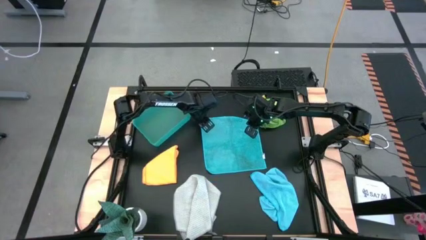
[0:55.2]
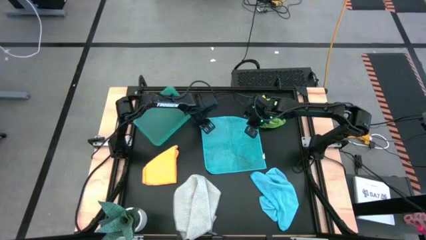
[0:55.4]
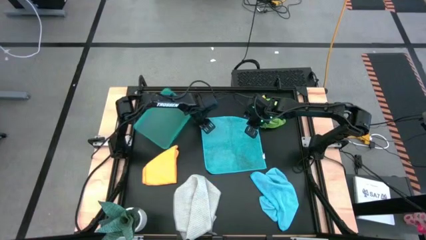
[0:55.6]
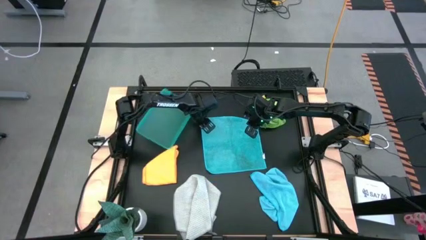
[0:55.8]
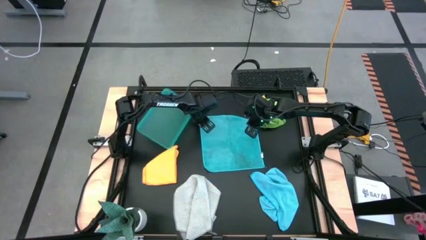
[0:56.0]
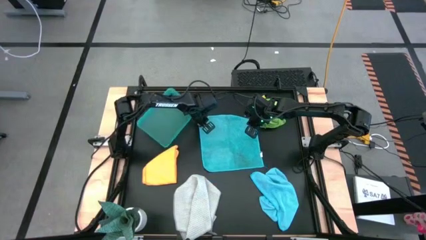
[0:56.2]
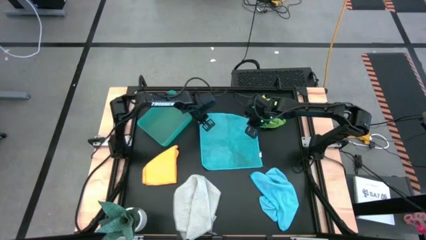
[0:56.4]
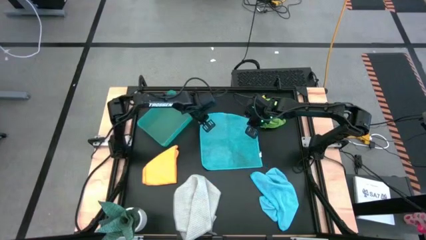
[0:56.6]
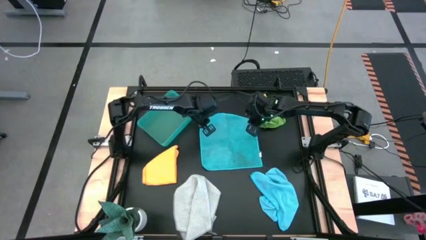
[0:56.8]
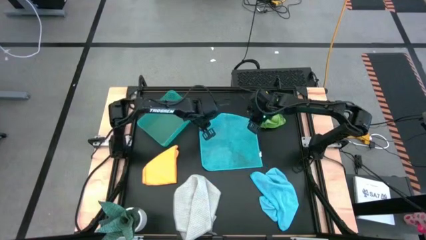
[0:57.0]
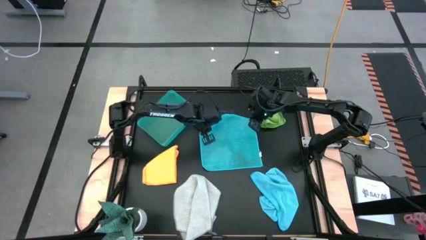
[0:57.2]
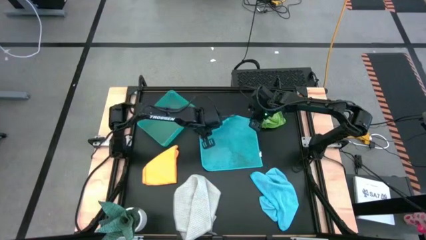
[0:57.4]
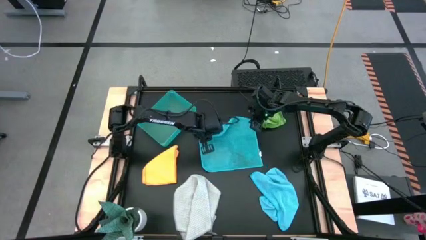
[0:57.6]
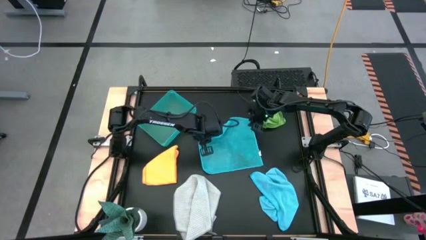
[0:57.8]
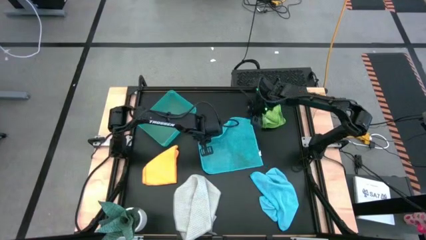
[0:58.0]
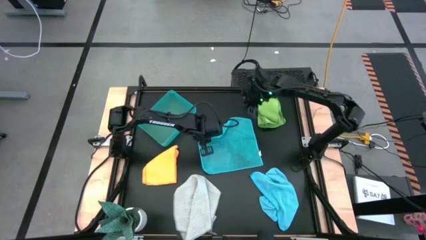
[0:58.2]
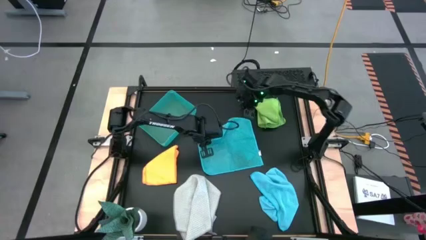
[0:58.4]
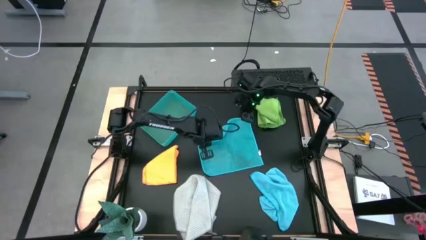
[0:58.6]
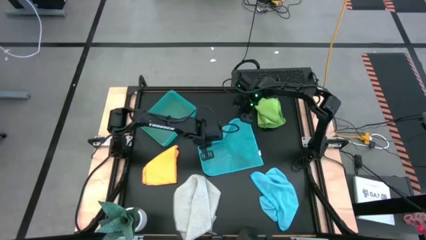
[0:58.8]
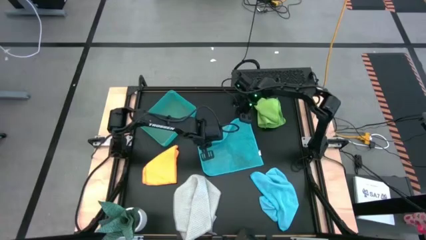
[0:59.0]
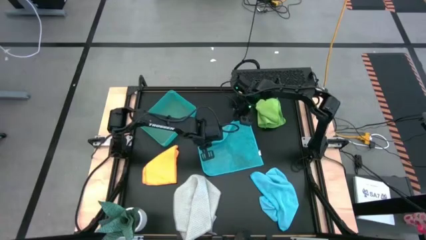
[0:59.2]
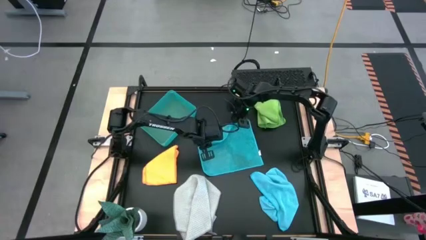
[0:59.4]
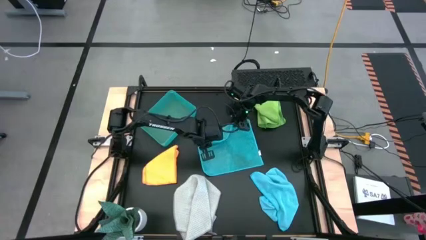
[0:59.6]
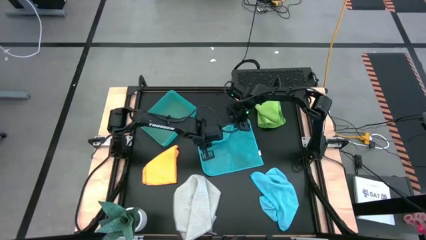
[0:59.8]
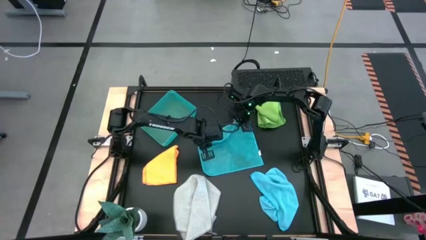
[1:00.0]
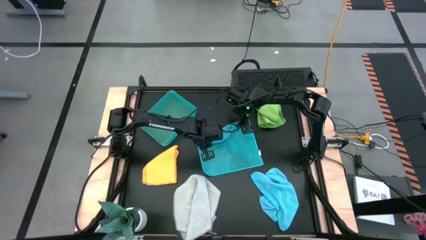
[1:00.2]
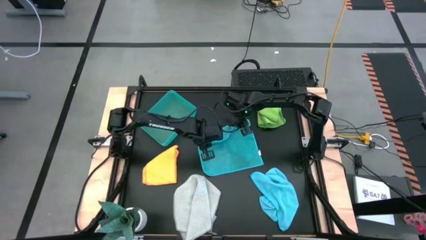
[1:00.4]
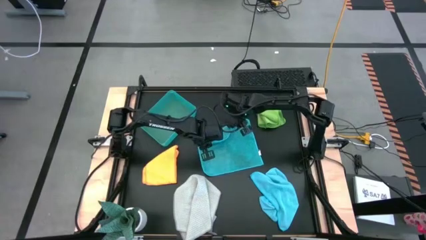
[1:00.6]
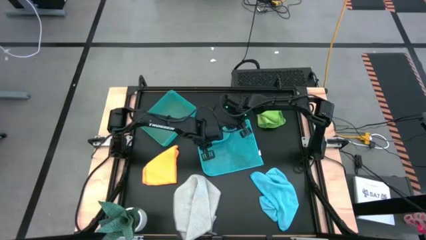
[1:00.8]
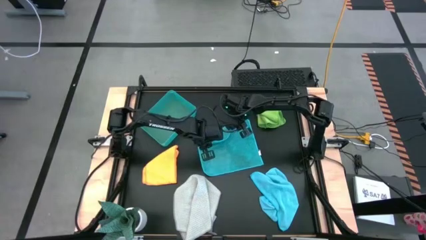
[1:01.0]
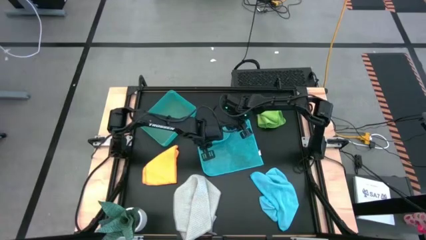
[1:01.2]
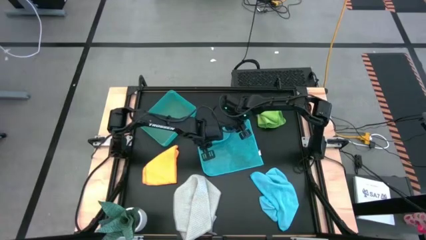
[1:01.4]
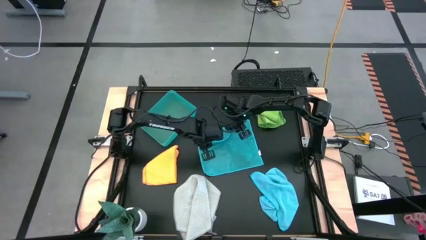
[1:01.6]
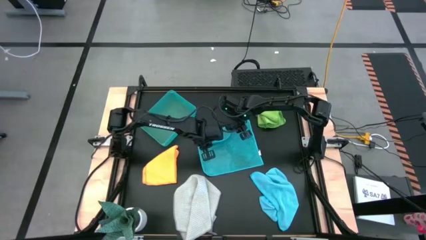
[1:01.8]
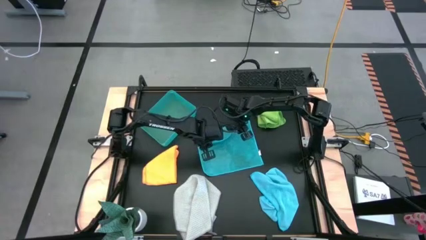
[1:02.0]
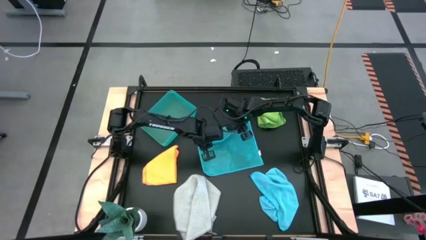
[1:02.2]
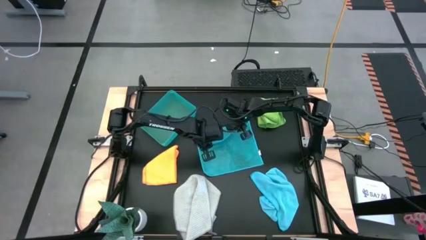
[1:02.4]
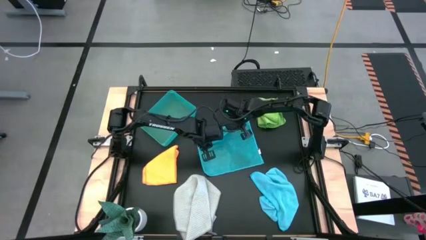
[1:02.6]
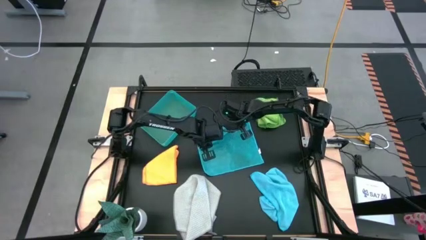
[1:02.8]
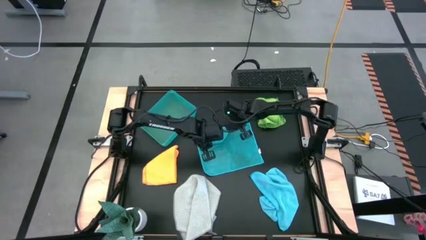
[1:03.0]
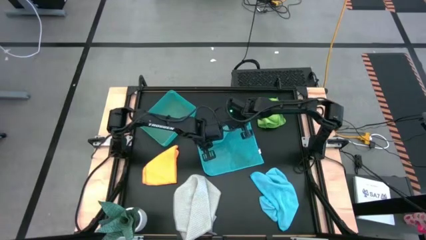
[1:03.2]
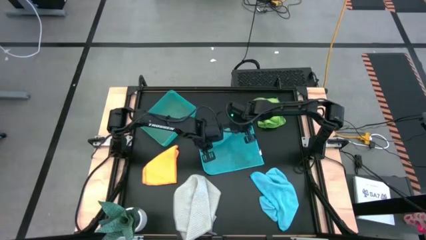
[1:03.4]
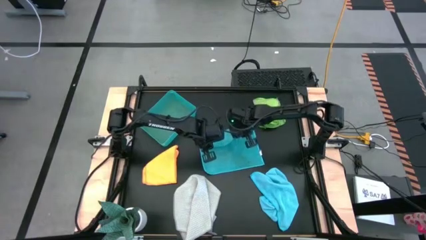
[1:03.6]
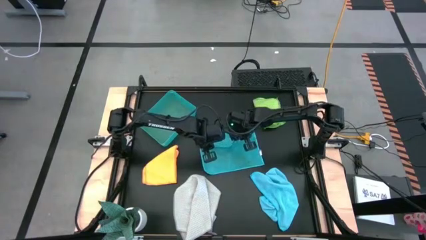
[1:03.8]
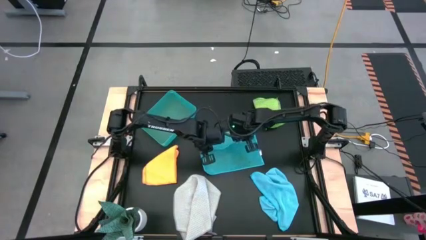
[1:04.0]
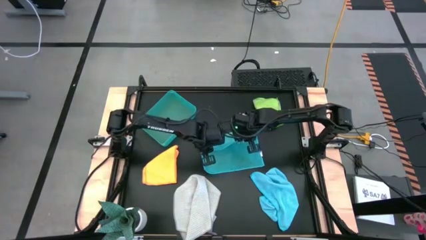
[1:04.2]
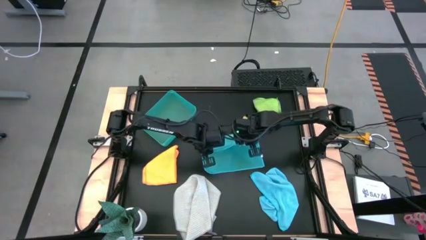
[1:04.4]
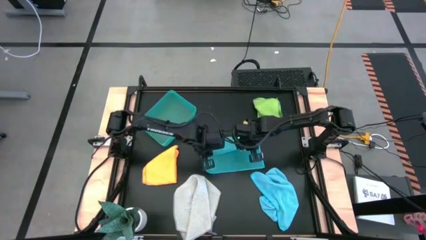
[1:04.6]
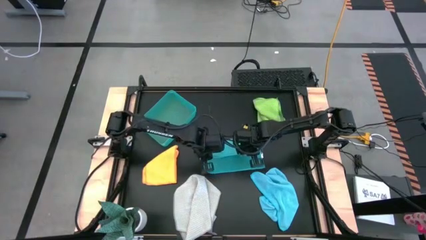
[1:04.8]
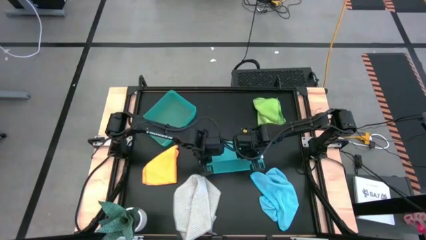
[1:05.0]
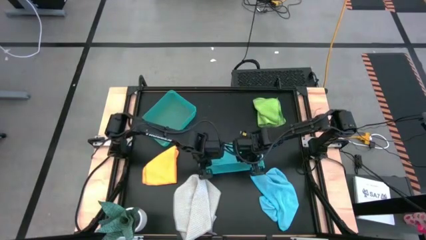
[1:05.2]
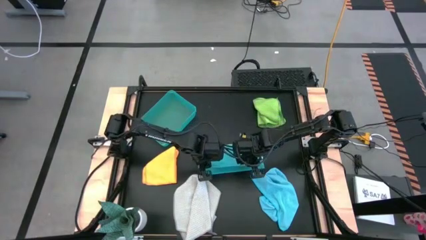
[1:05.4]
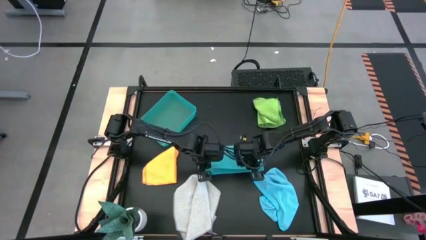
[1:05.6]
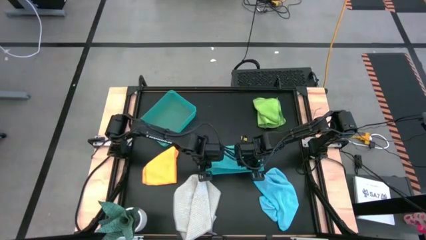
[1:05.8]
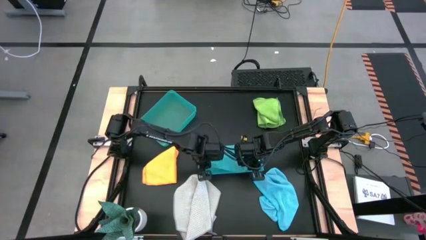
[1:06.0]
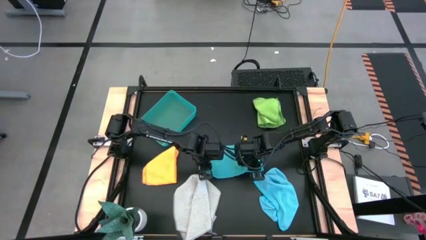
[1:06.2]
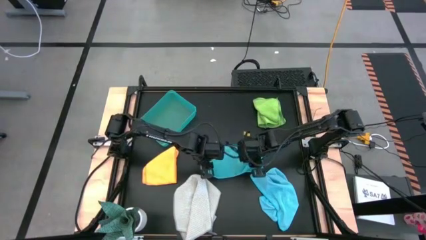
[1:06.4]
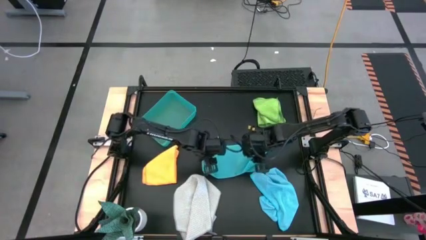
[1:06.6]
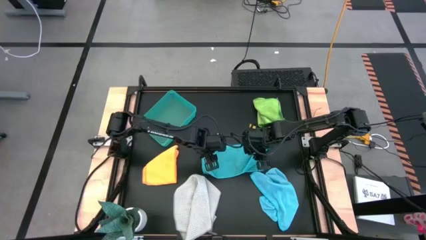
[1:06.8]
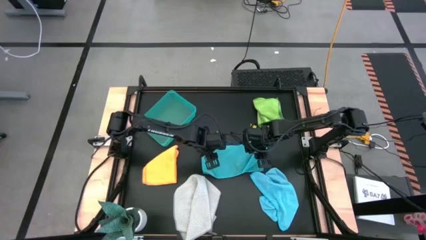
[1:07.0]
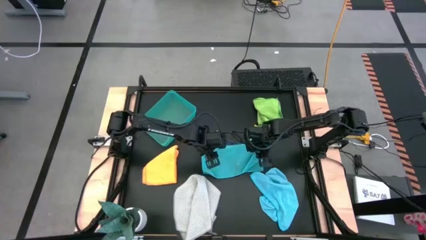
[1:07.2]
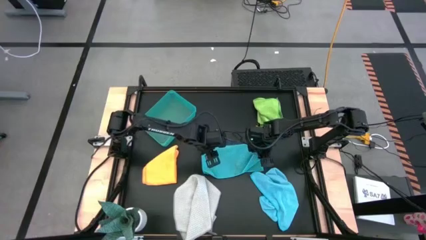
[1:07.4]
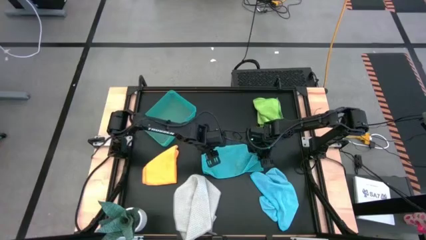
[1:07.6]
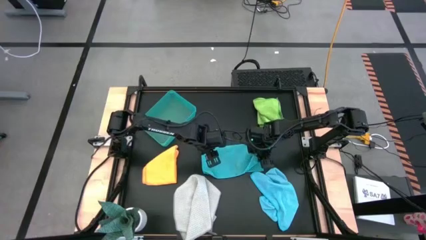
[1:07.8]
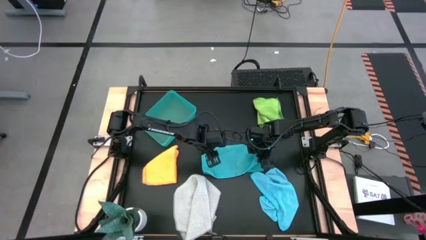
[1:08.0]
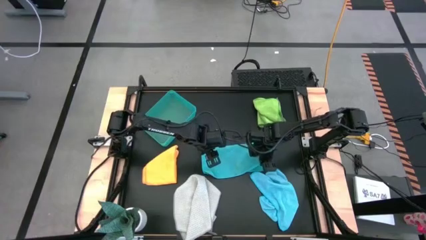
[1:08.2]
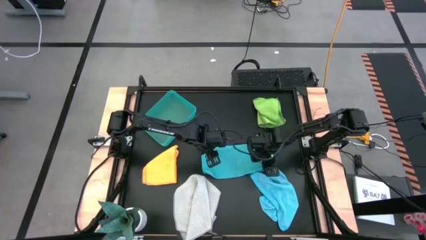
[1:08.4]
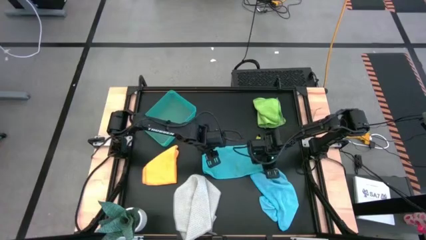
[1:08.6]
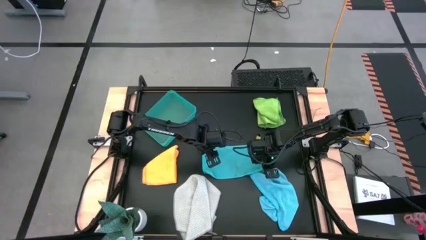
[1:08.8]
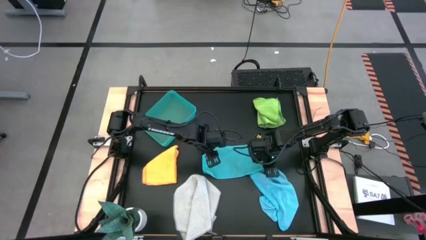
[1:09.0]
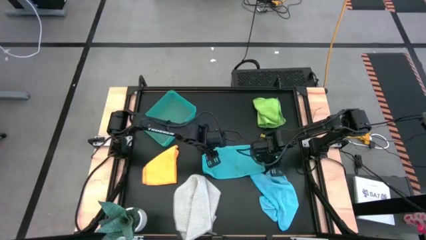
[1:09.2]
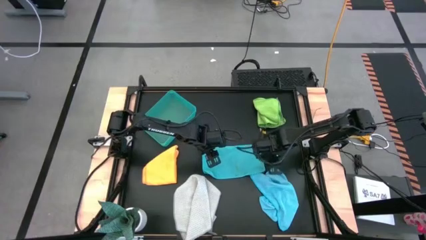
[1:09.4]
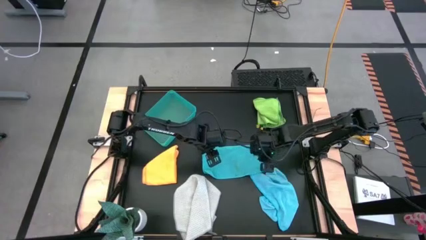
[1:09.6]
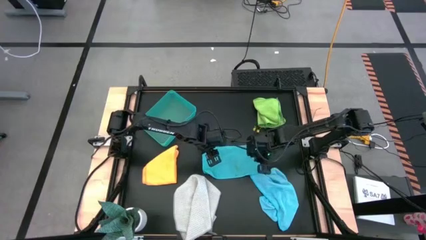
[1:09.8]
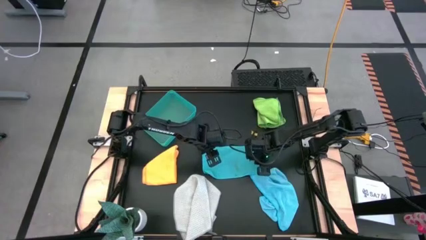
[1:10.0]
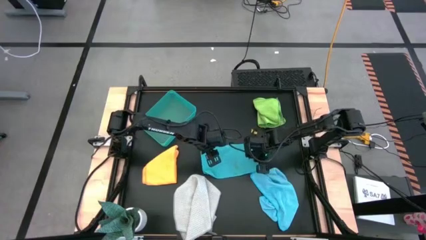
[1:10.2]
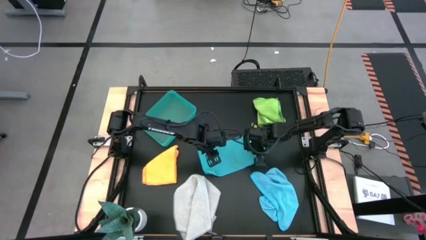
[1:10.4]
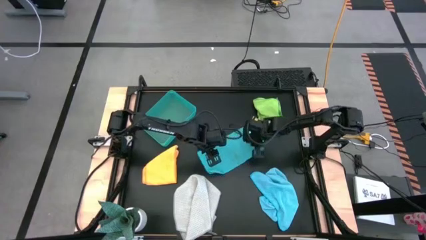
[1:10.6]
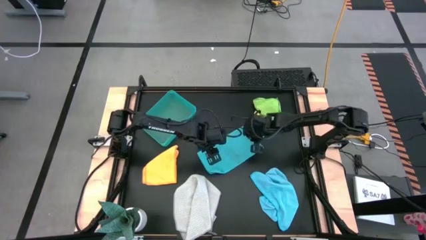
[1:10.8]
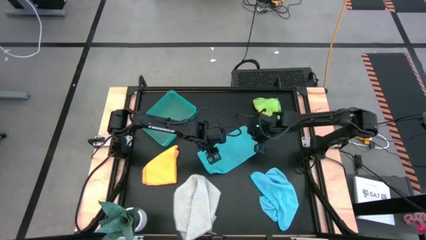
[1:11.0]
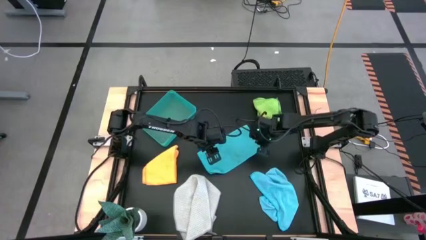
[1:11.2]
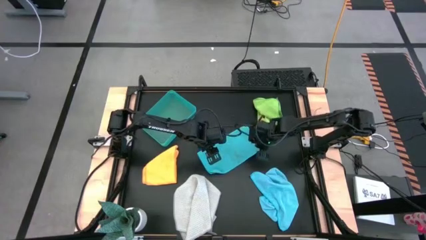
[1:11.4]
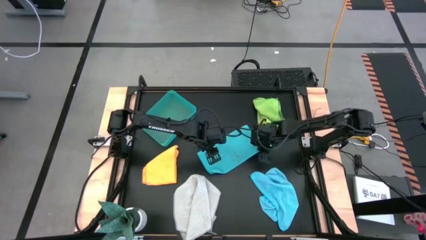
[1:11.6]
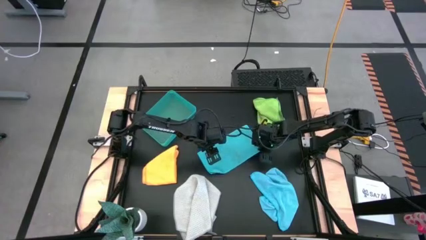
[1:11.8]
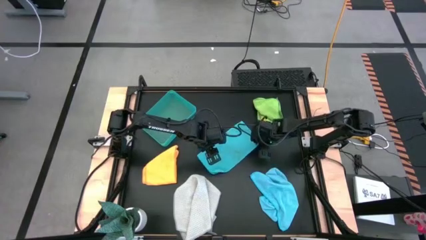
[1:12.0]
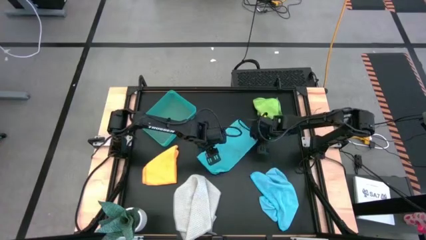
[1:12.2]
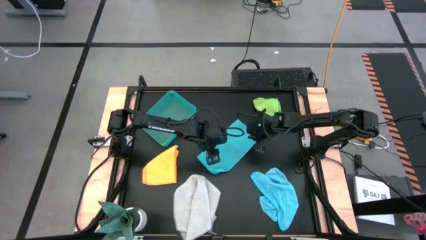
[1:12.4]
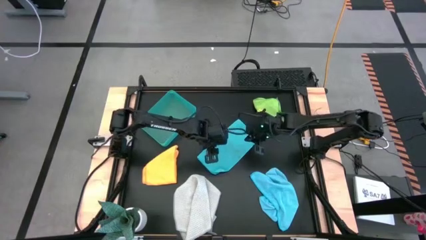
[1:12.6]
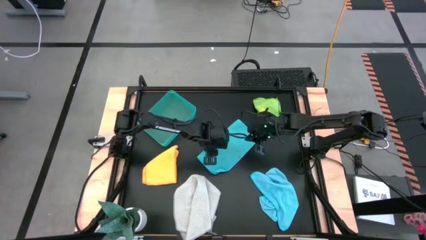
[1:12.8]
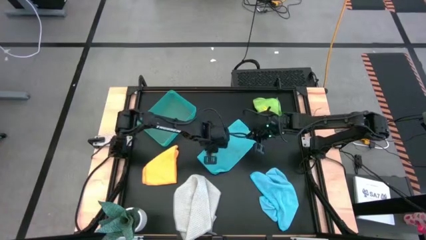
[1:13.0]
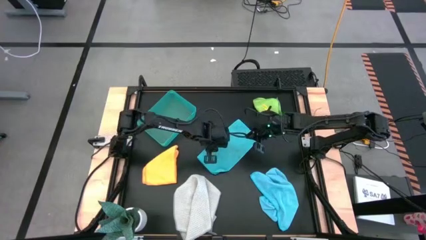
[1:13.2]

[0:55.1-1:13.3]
Task: Fold microfiber towels
Fold the top blue microfiber towel
